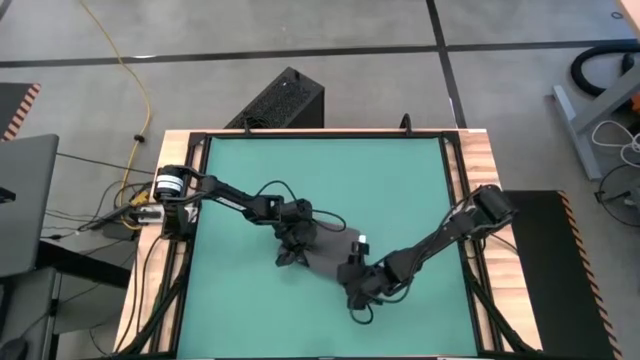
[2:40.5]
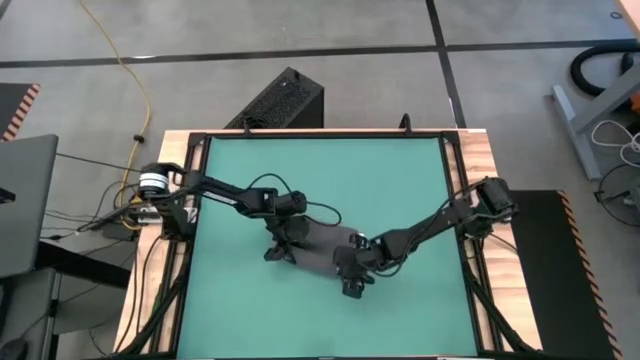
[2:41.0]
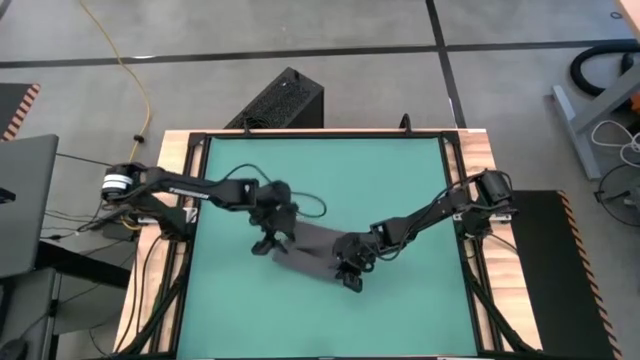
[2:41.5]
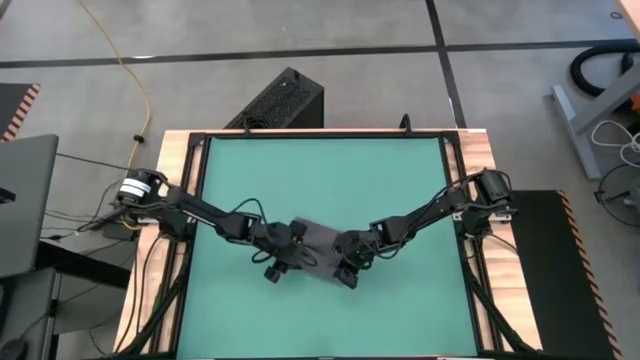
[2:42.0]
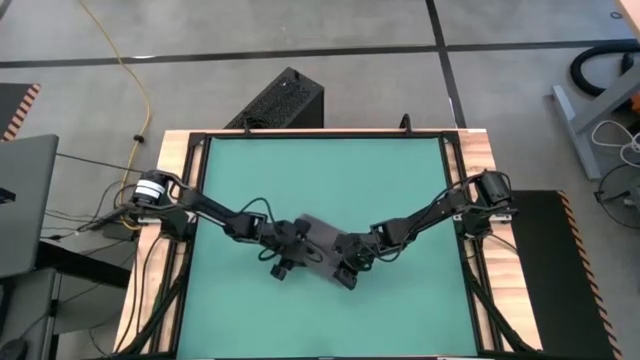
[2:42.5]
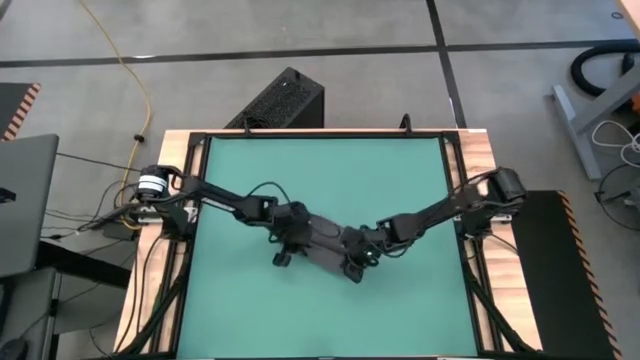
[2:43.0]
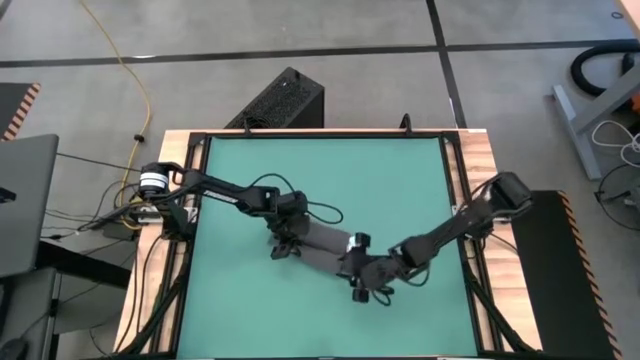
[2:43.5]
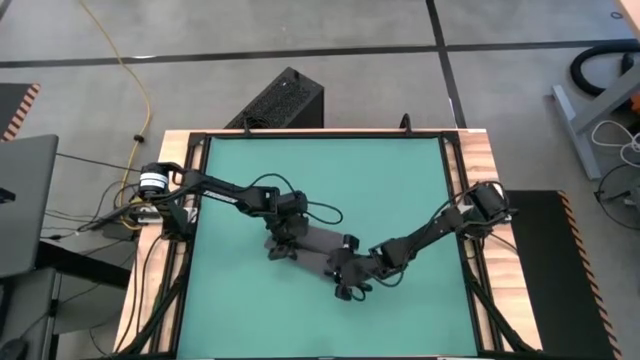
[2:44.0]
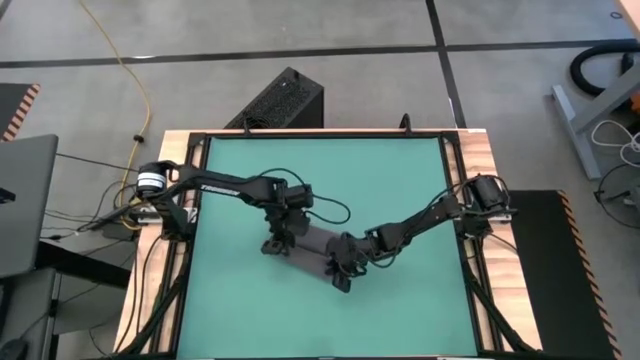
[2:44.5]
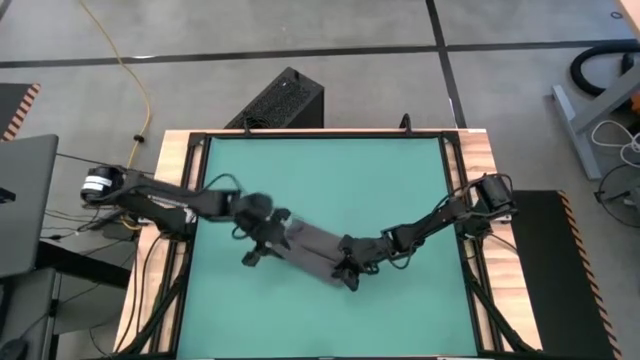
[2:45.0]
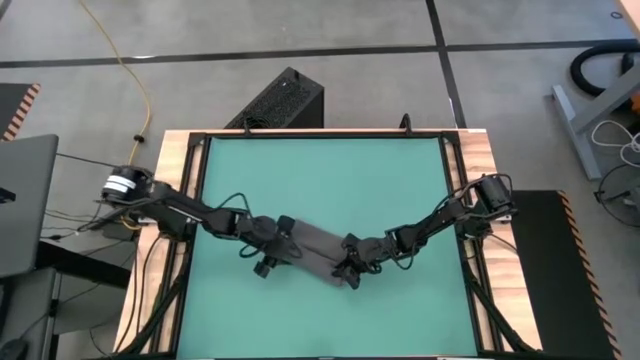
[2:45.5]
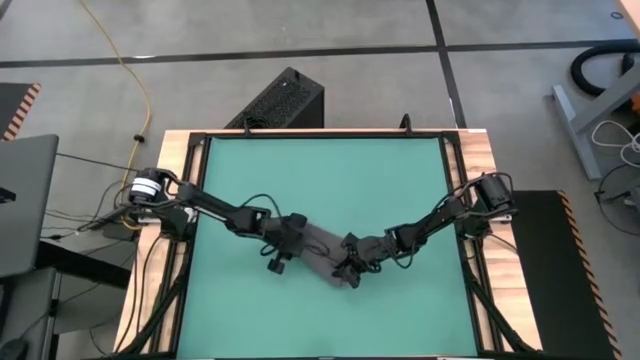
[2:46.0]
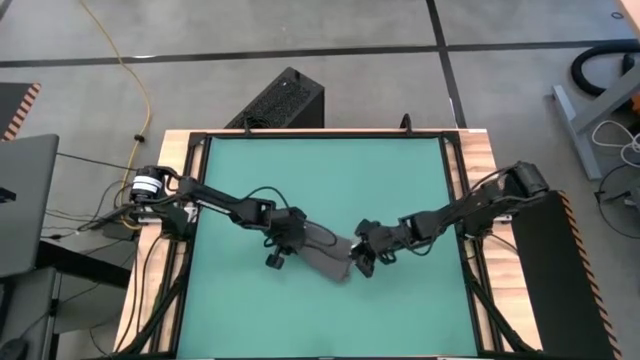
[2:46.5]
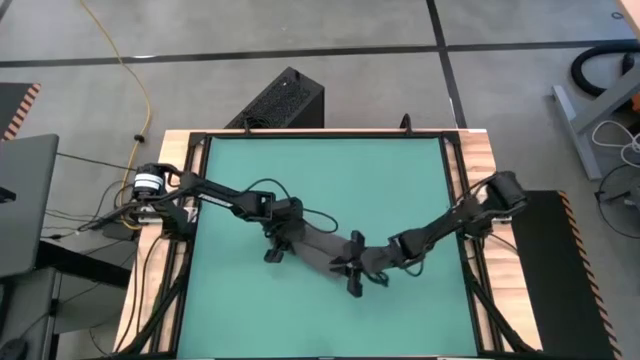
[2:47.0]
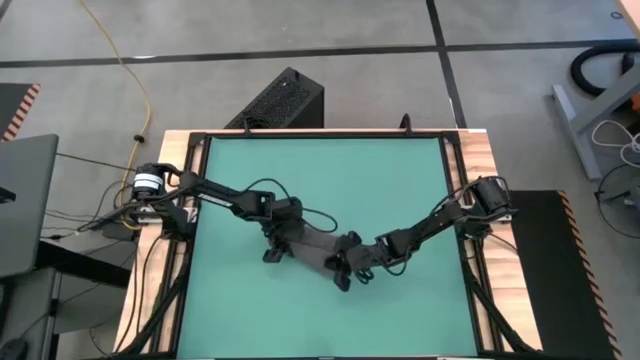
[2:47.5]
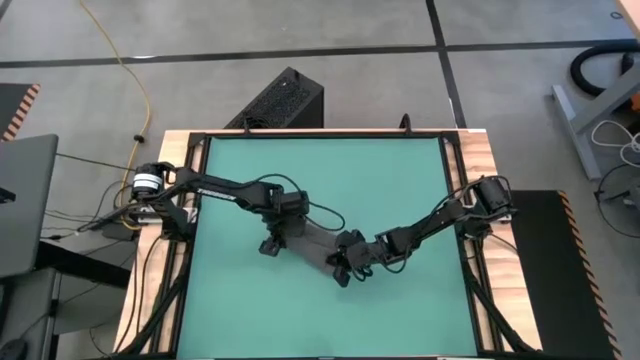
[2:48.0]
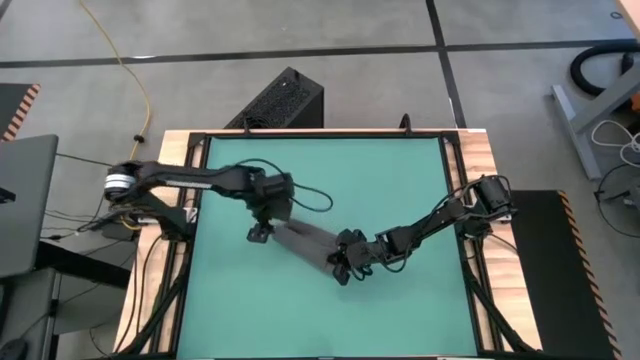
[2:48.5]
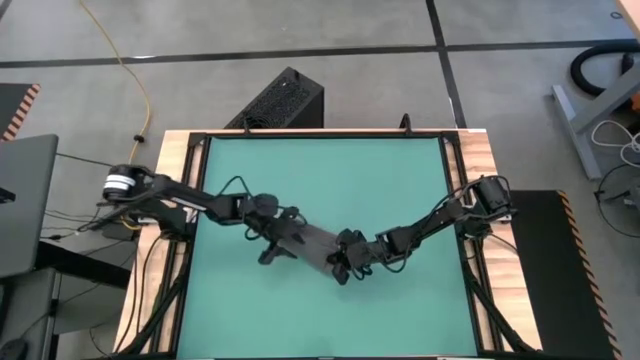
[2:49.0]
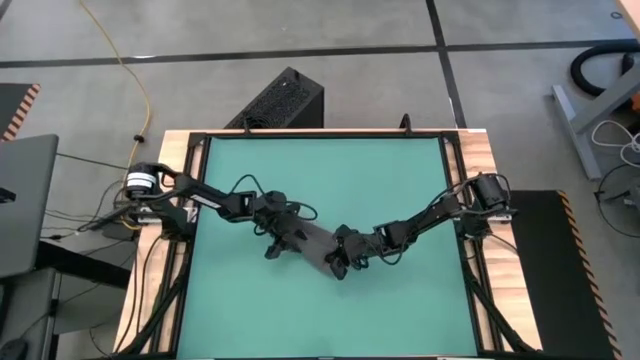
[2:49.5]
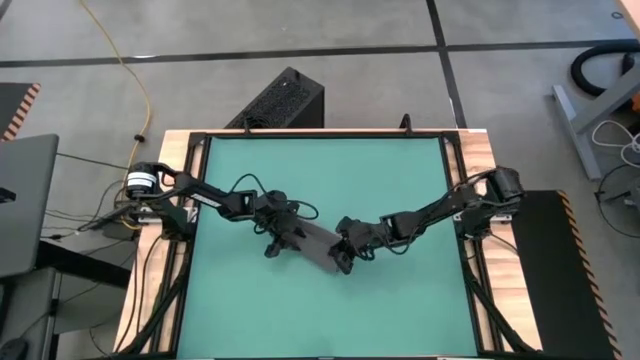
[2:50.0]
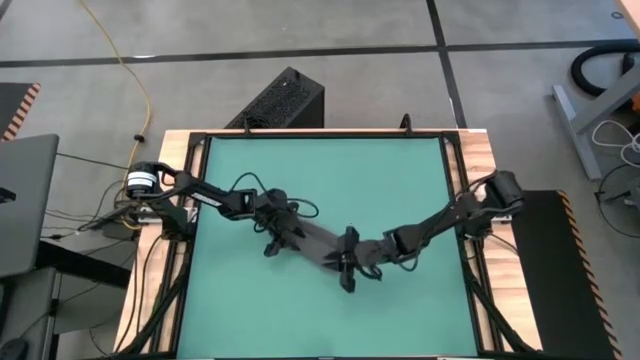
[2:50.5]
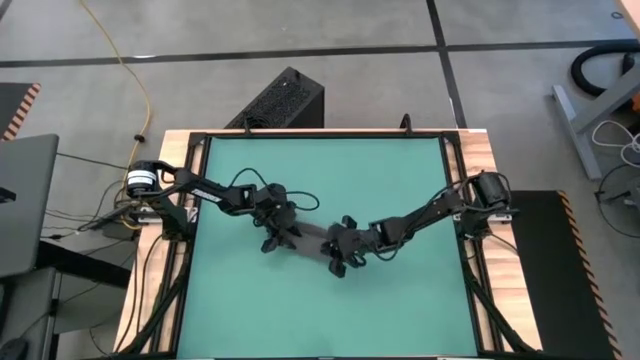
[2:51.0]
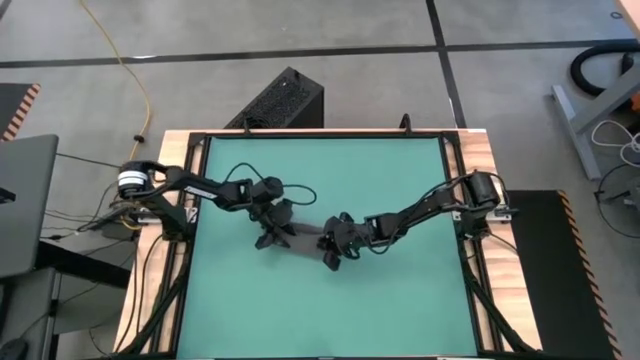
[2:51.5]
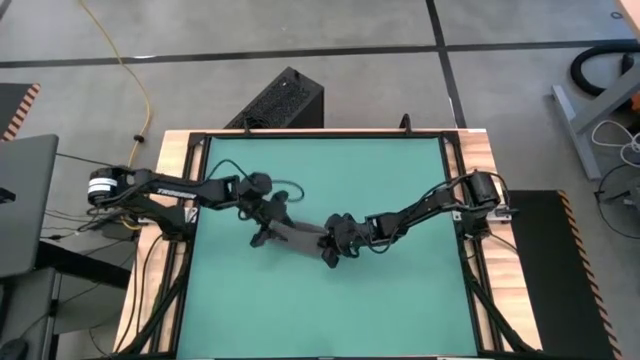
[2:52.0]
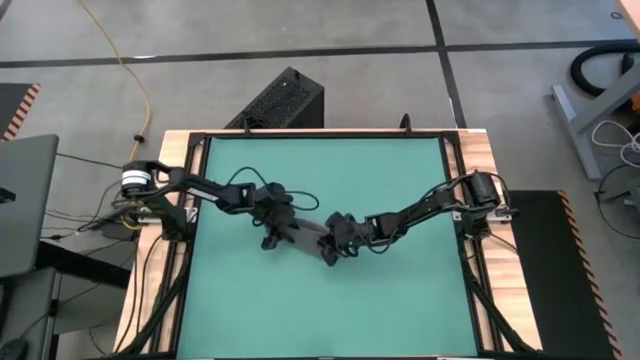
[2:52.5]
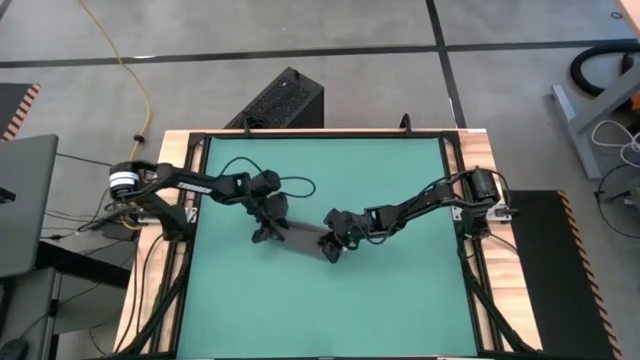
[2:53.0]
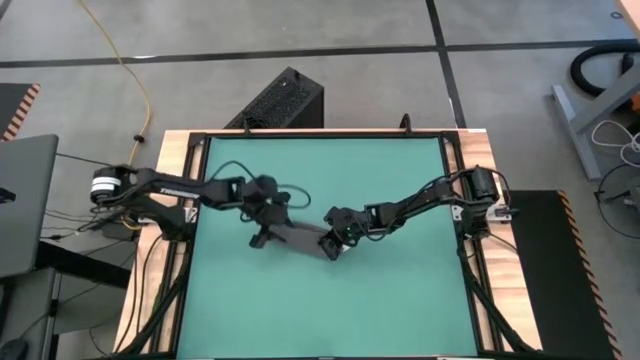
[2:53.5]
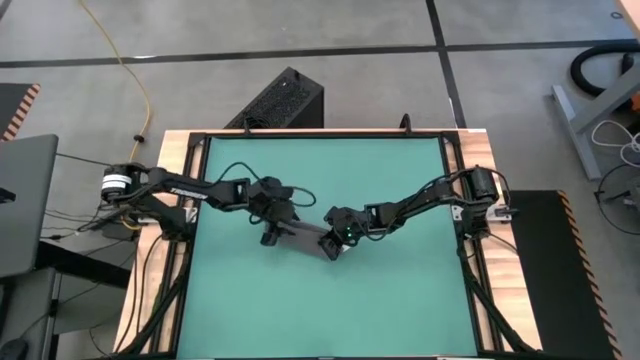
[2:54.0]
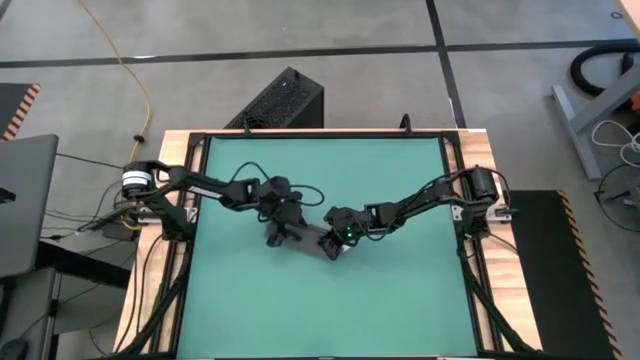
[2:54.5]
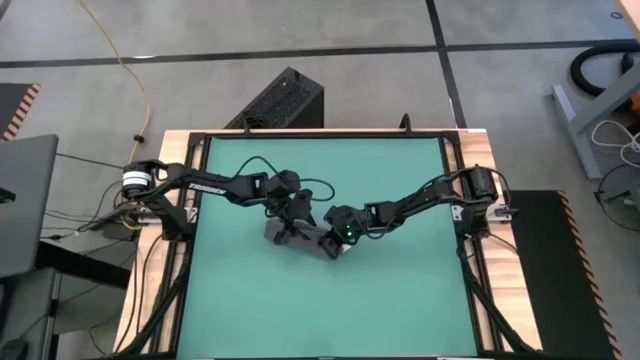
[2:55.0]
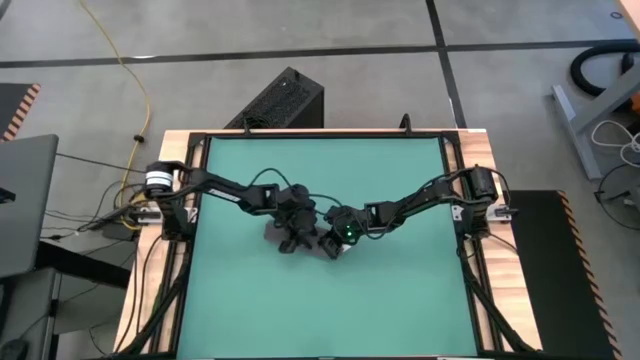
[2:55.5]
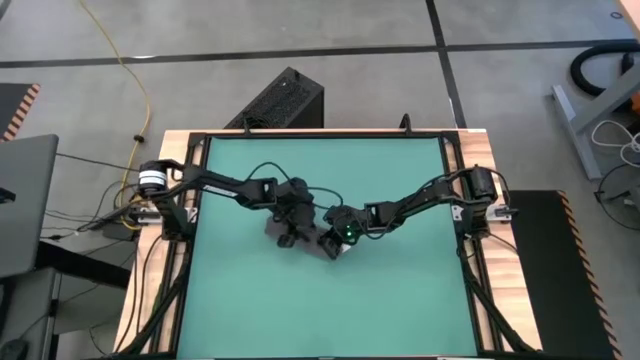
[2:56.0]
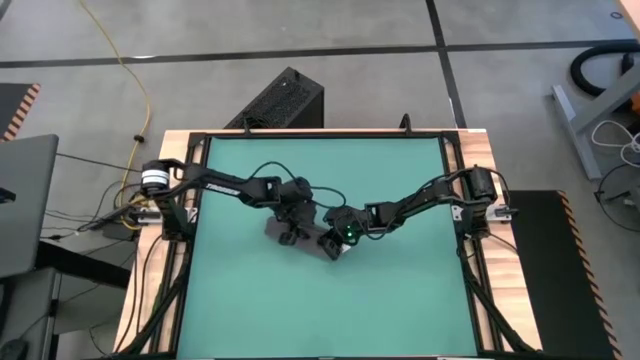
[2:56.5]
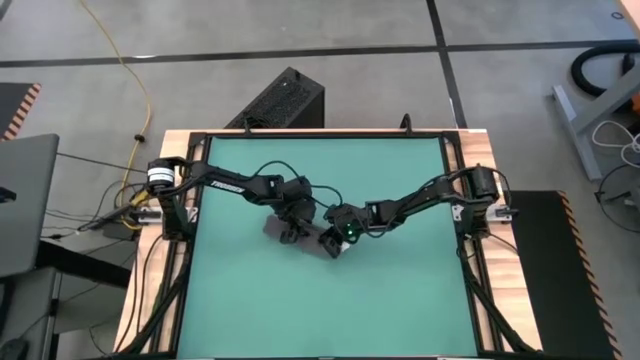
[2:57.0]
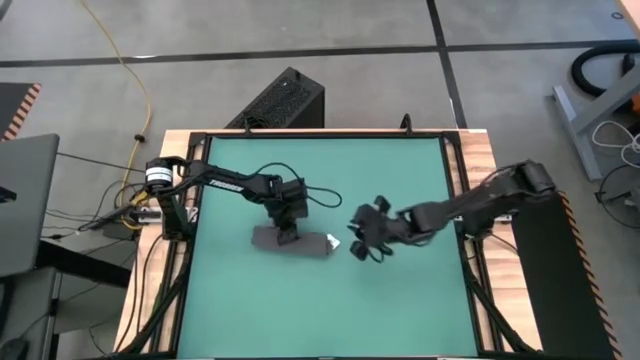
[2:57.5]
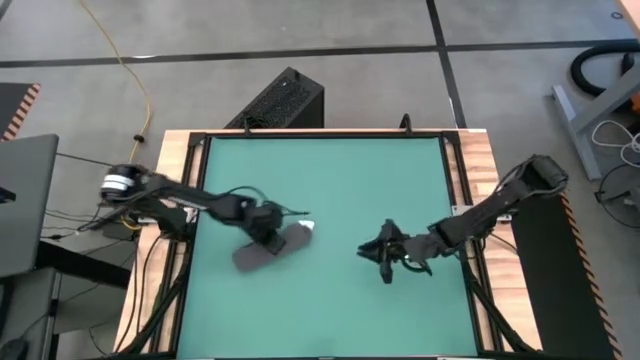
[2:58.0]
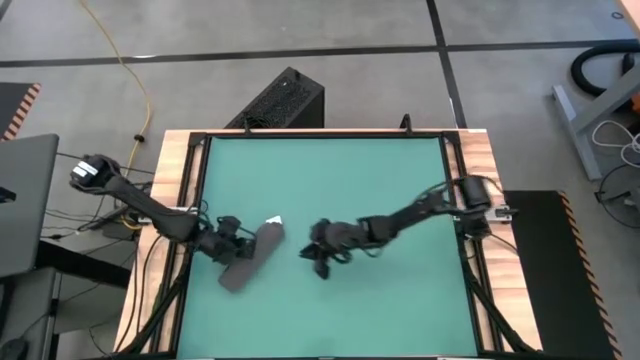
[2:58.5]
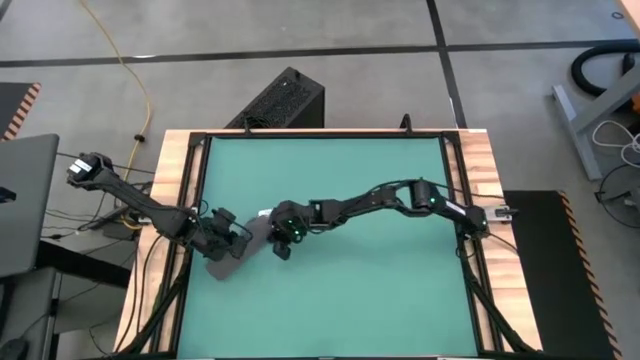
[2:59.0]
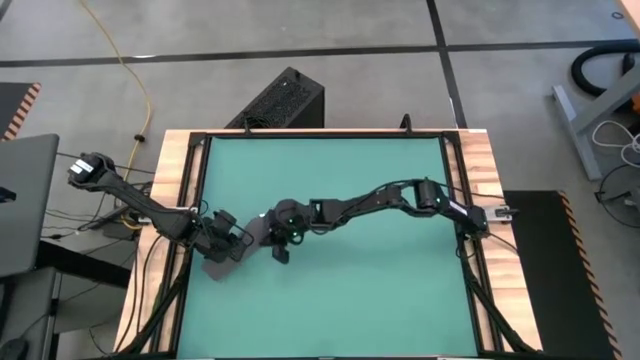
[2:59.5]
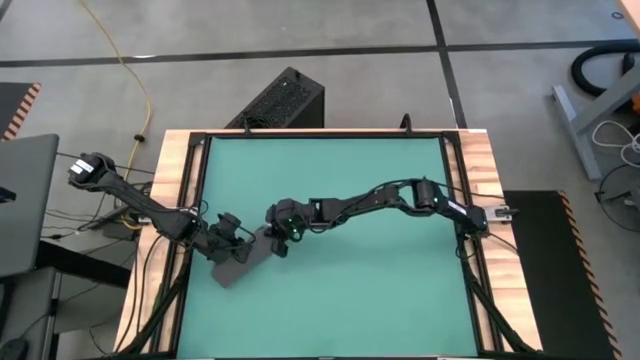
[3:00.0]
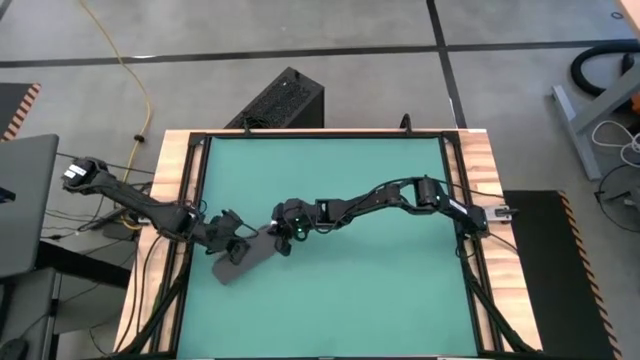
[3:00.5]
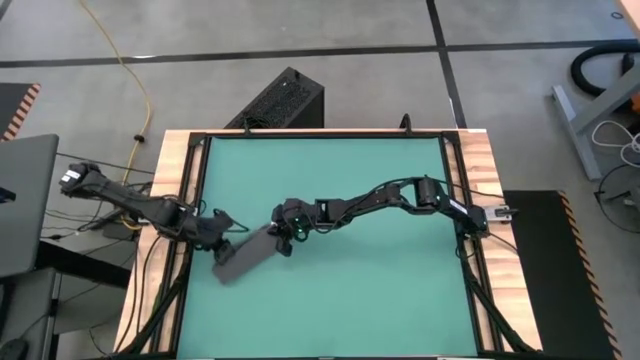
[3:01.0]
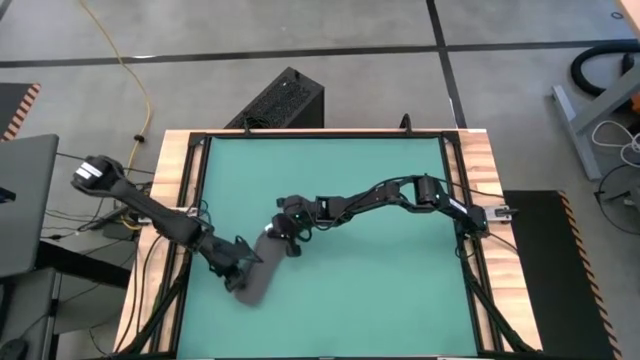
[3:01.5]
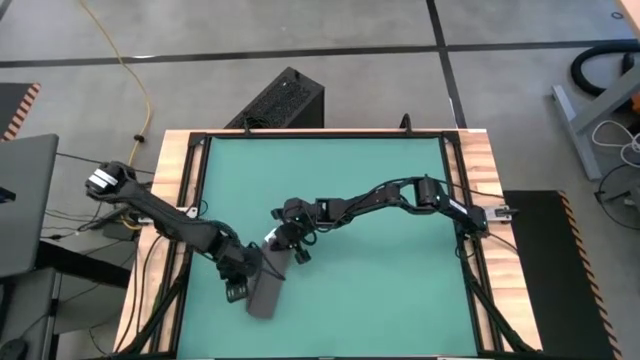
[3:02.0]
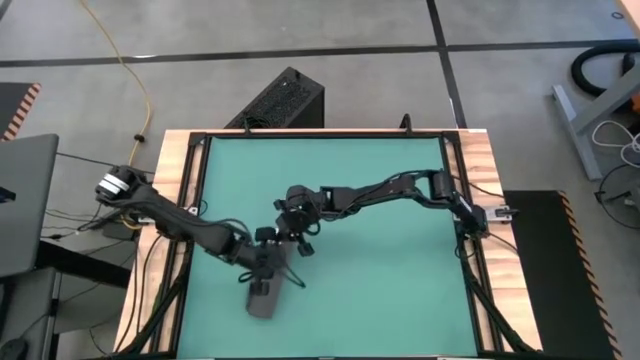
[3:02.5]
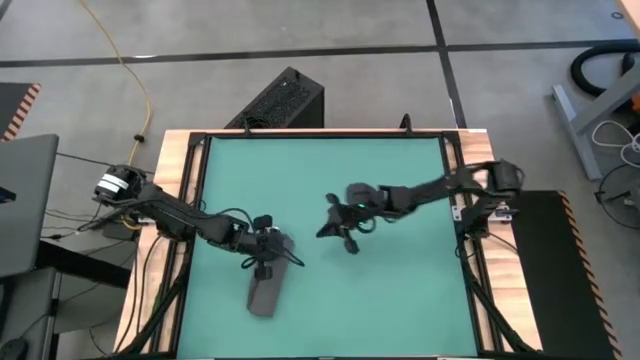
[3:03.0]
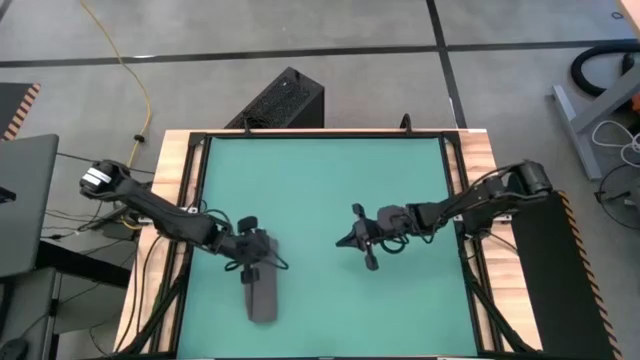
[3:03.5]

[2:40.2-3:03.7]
Task: Roll towel into tight, uniform cylinder
Roll the gray towel
